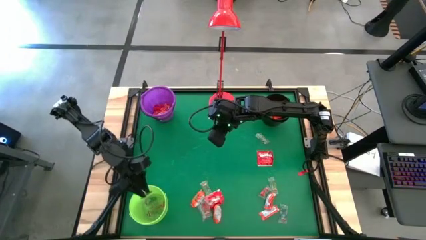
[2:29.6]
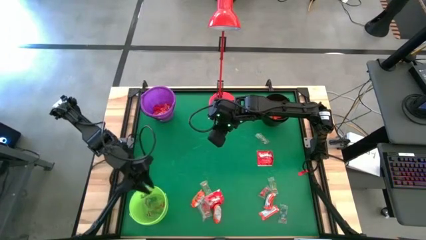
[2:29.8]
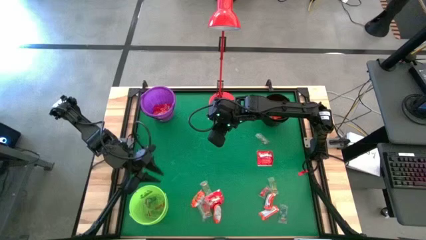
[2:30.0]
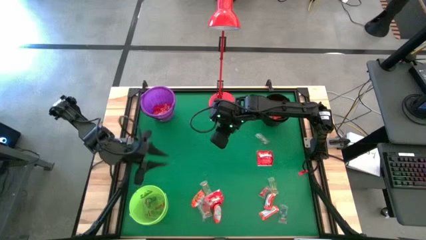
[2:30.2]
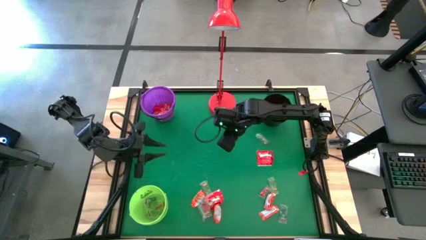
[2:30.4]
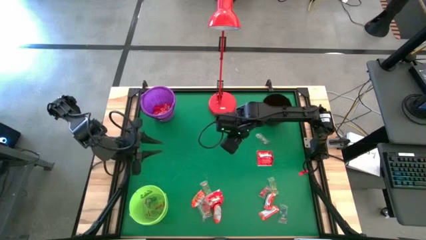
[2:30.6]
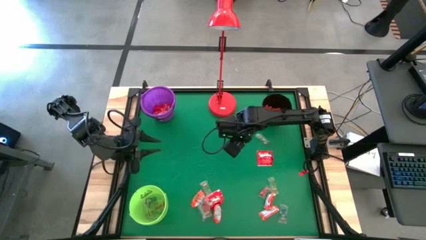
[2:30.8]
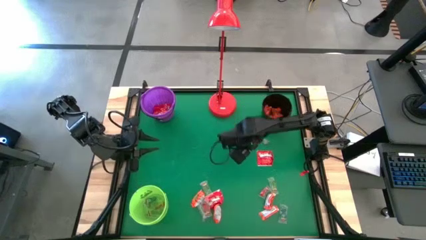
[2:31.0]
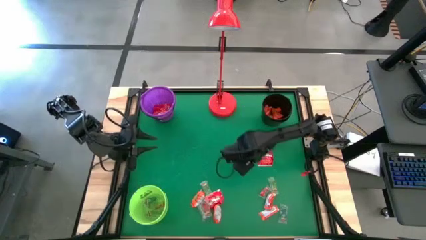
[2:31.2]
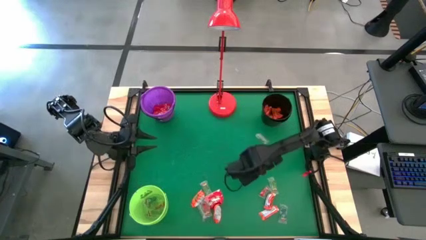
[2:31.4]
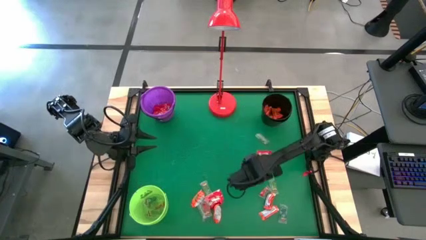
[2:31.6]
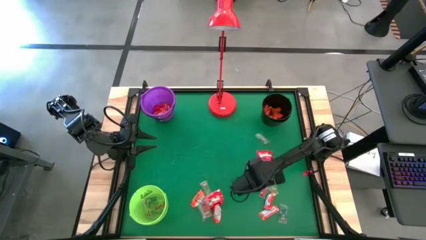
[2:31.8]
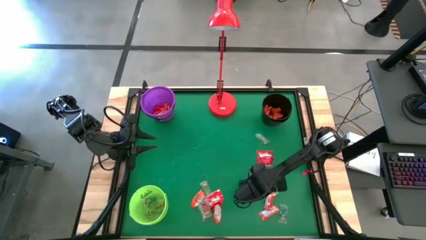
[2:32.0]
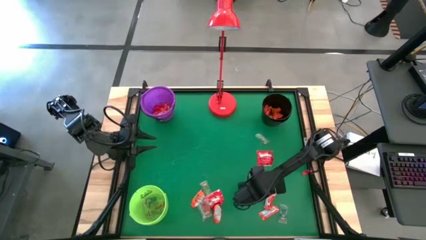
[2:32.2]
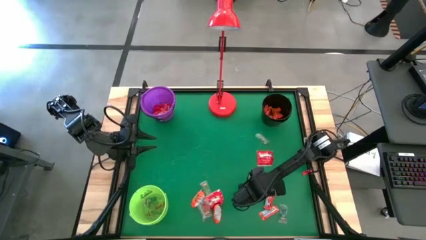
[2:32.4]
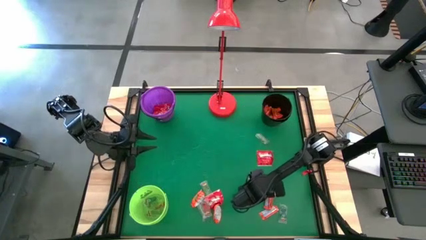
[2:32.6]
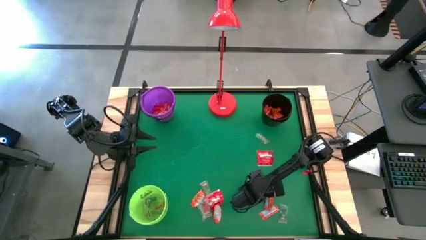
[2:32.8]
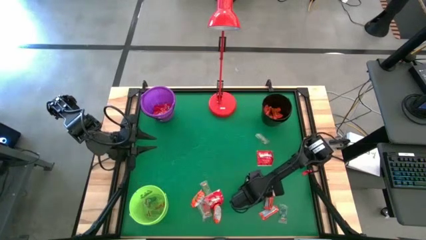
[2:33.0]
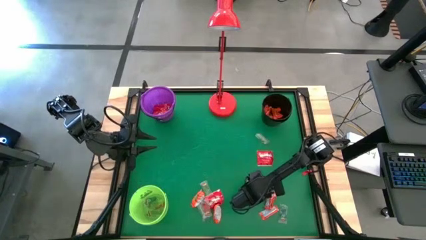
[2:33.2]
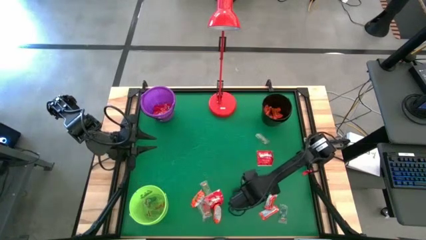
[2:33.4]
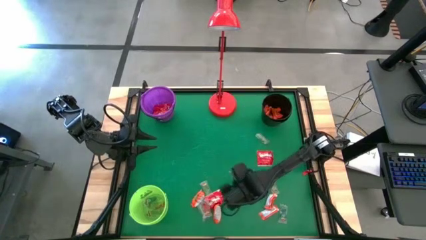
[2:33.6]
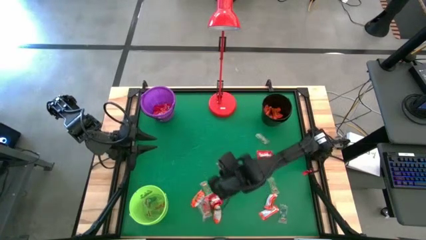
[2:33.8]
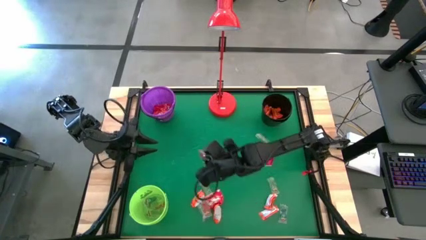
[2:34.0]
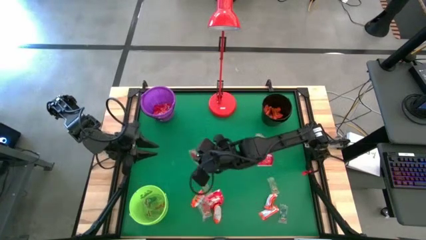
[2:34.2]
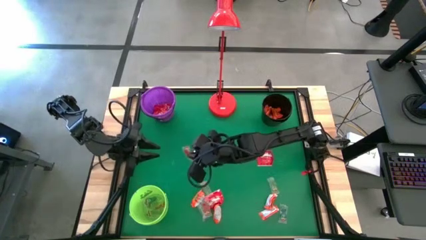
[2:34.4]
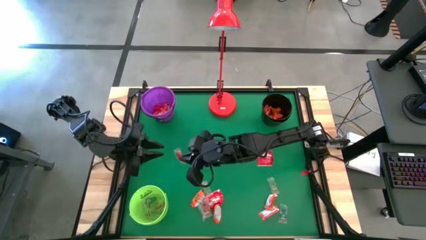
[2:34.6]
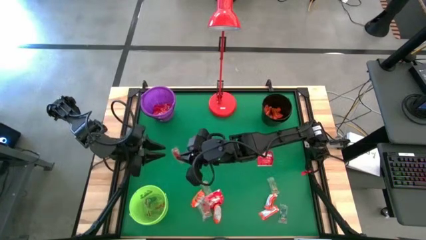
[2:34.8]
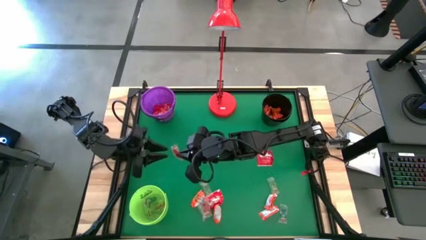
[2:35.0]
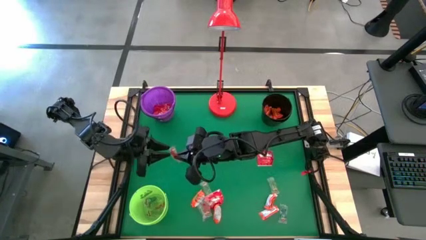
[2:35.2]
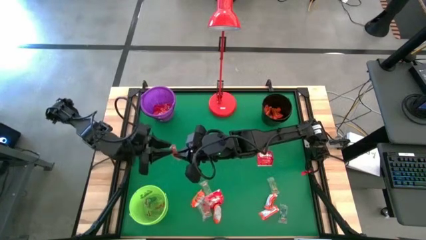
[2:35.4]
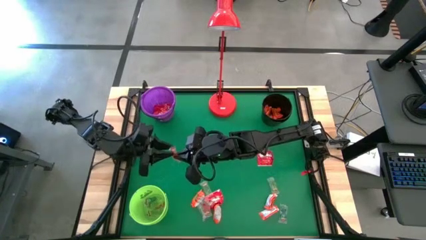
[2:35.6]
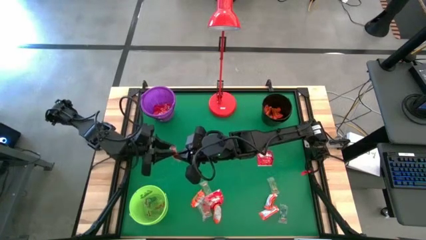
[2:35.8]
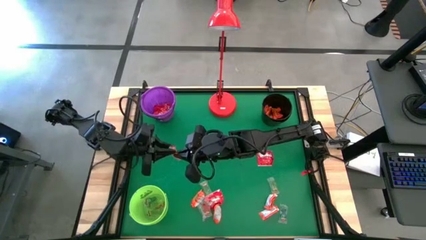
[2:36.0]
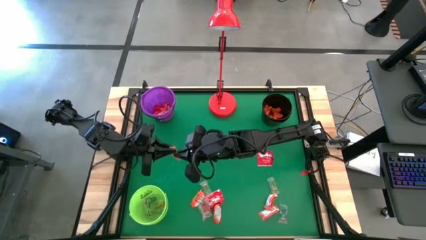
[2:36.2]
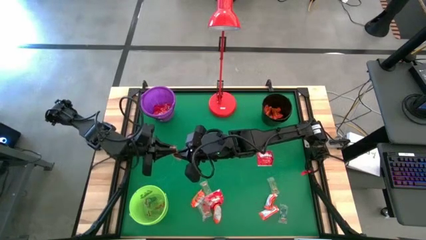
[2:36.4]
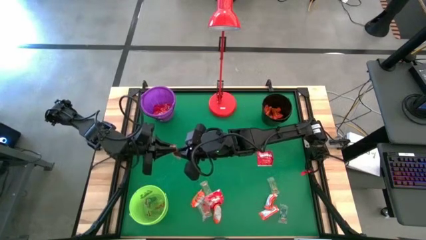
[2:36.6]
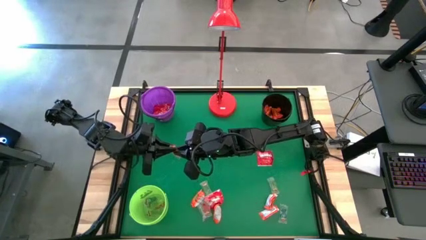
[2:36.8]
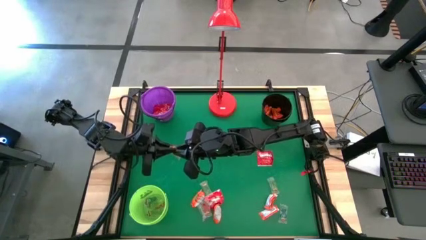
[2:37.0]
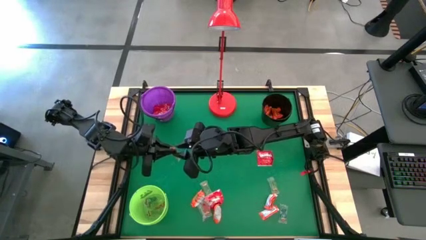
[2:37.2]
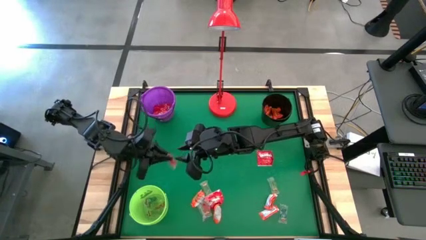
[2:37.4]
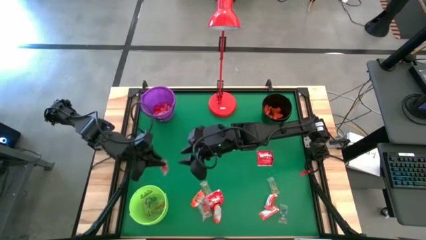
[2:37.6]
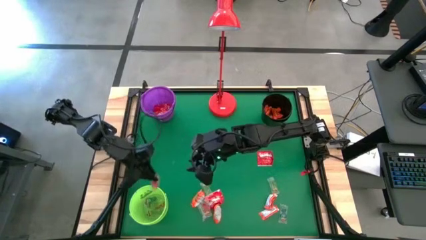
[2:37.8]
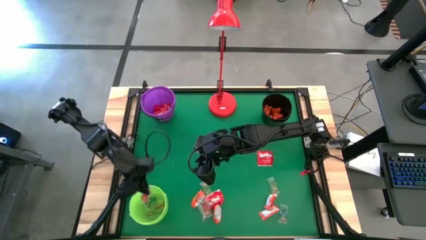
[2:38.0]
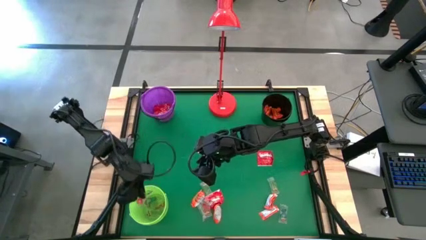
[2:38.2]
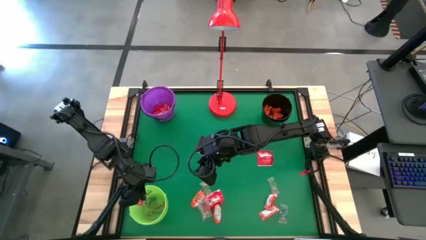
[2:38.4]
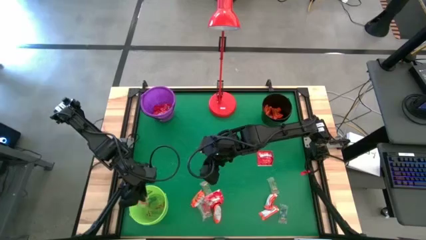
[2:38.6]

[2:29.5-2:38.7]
Task: Sort candy
Put the red gummy into the light green bucket
